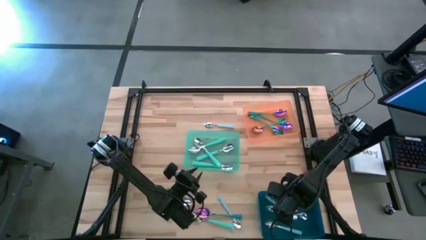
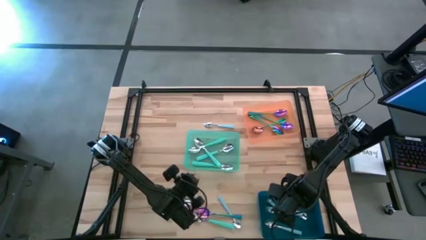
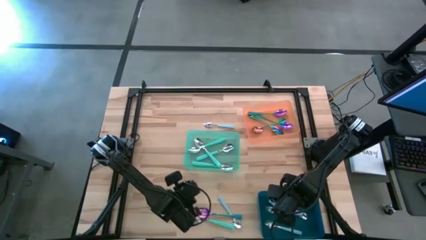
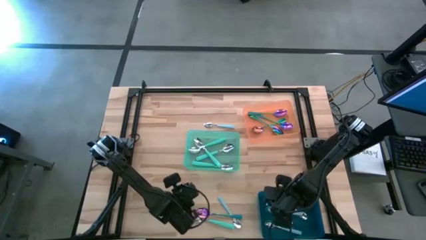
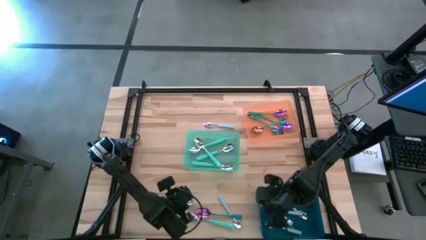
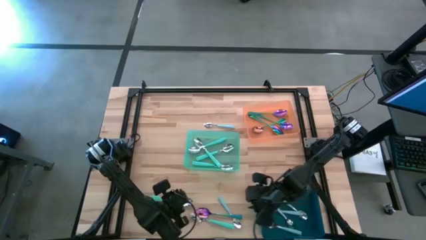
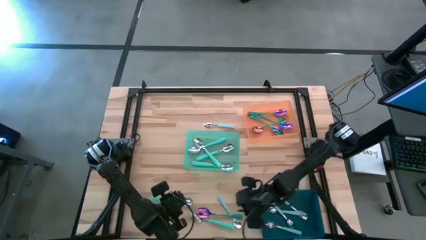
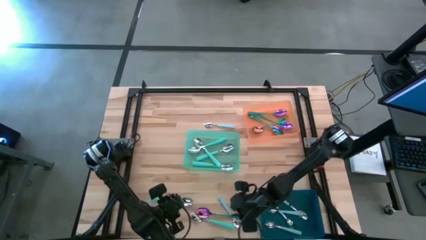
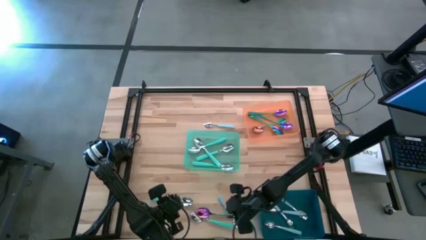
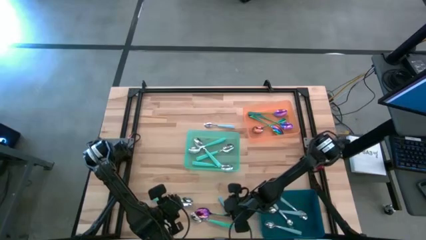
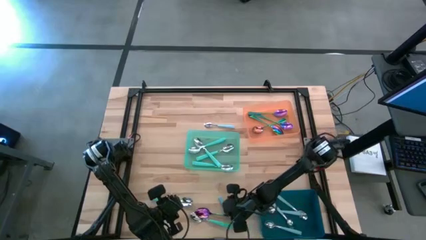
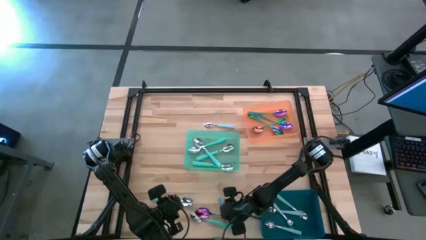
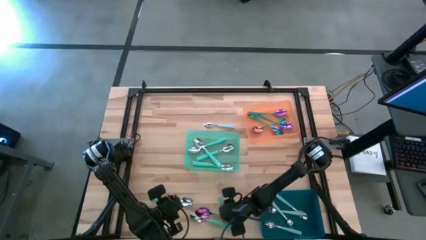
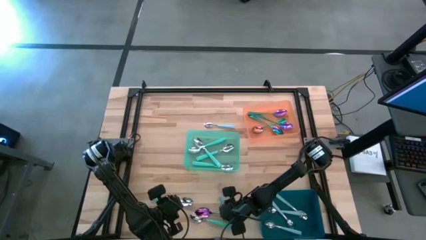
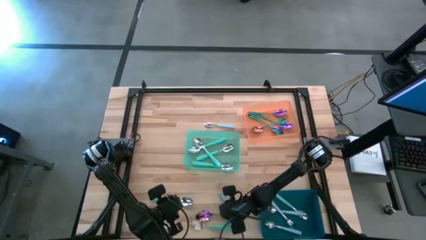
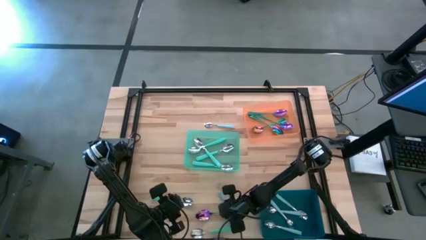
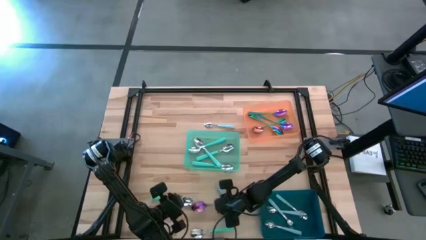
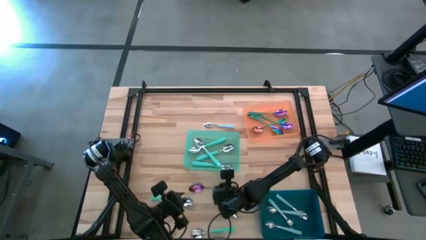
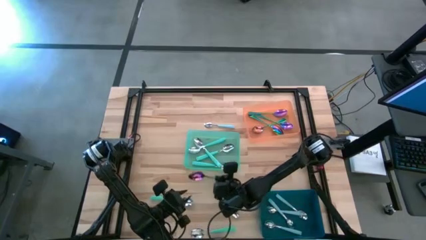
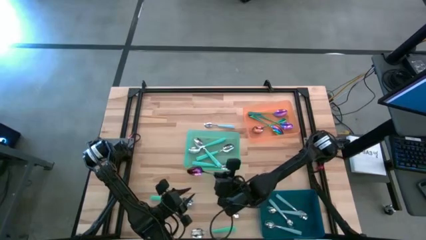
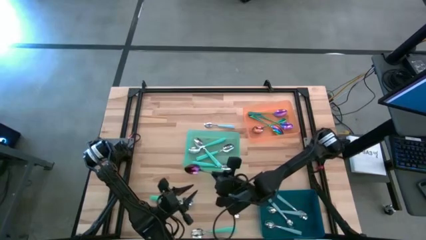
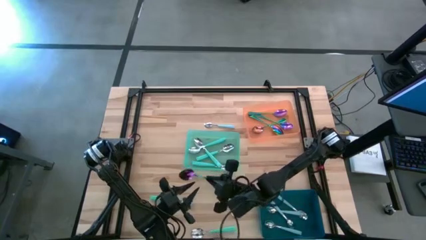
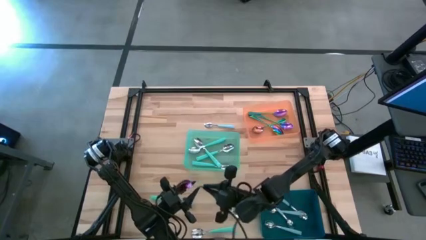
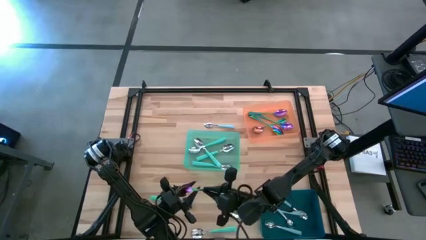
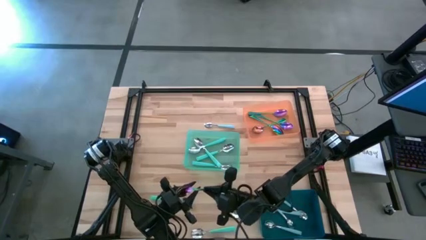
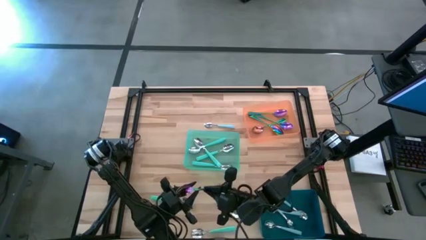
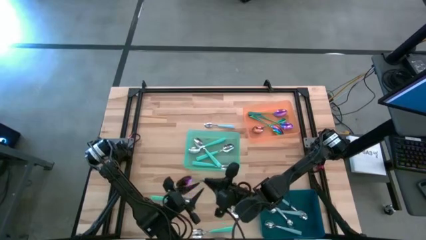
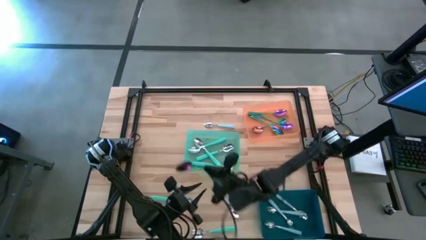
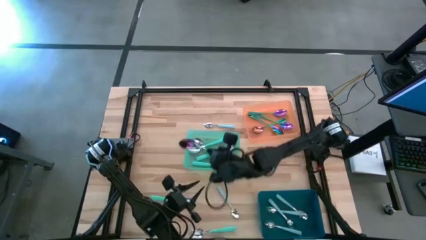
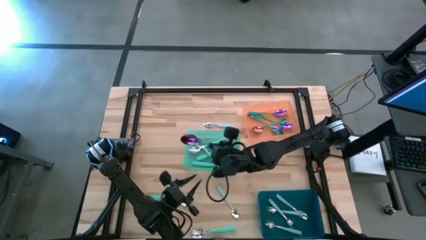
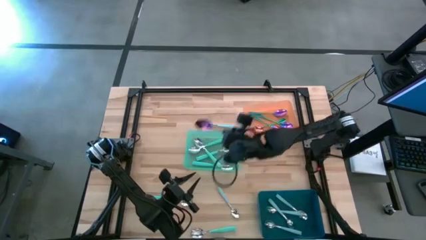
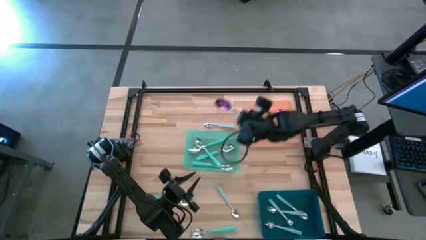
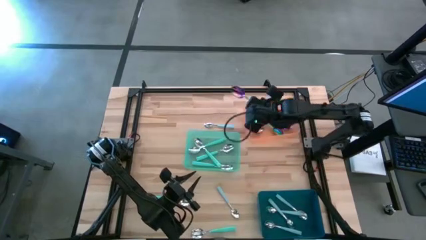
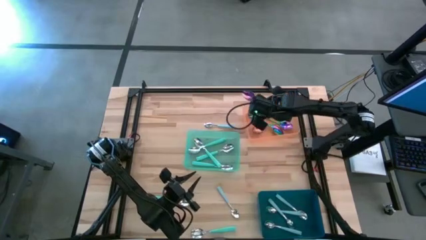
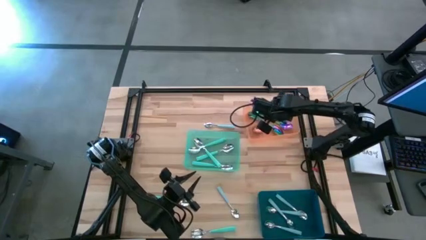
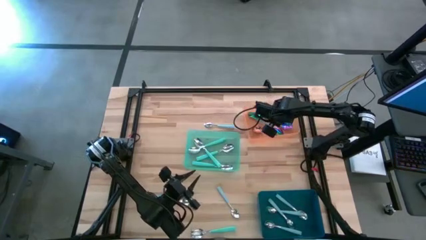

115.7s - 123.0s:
Task: Sort silverware by color (type)
Put the violet spoon into the orange bin

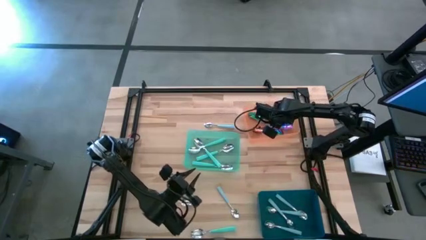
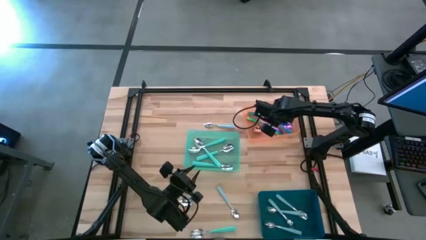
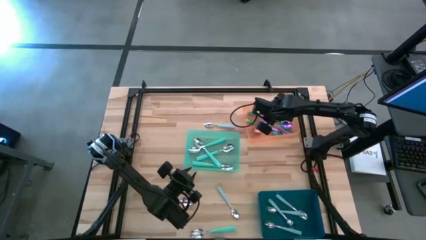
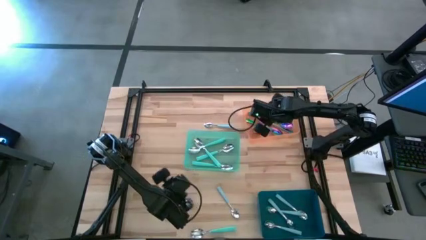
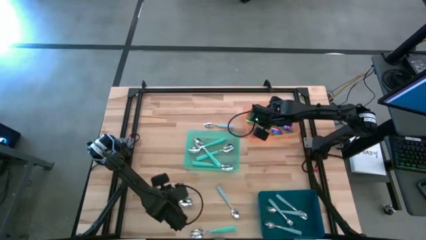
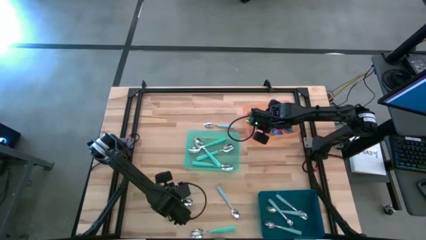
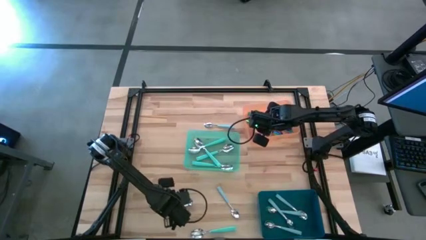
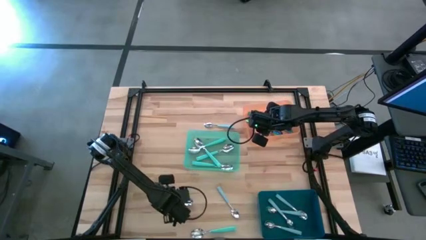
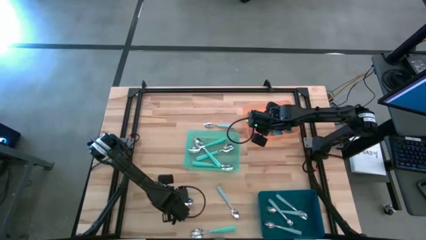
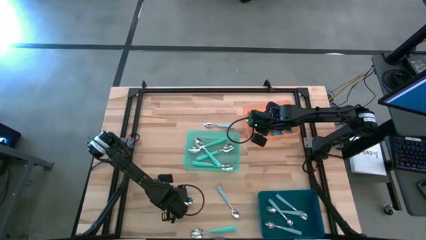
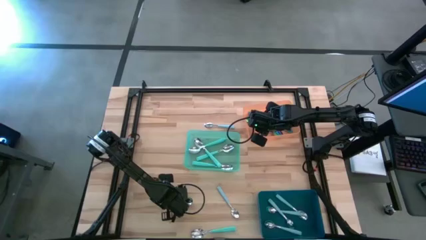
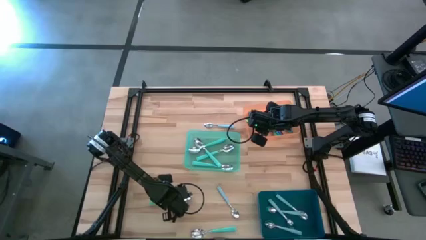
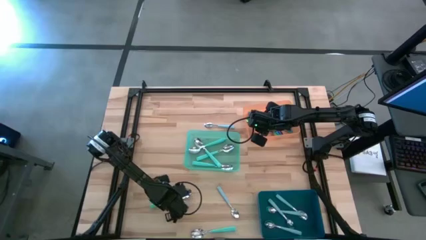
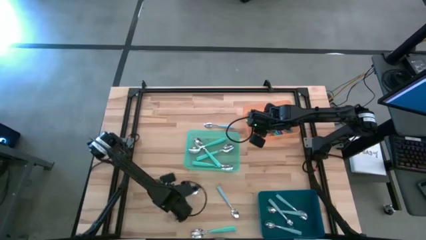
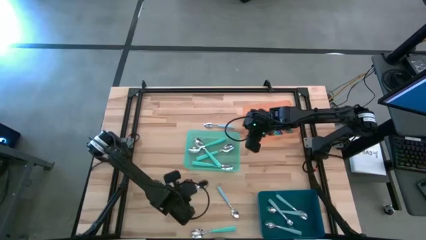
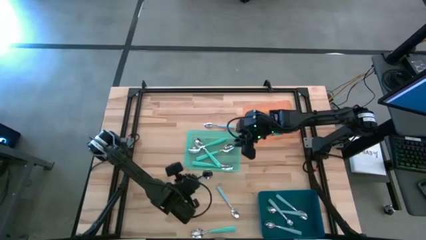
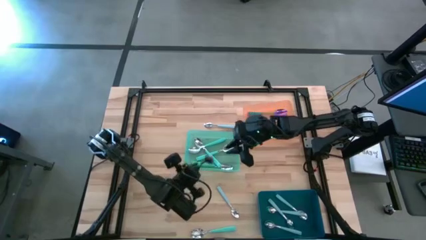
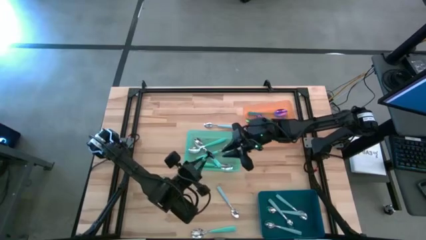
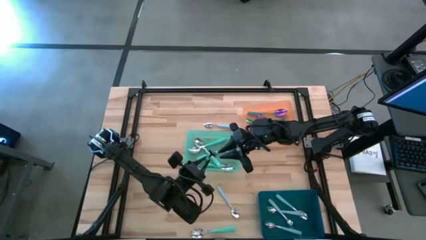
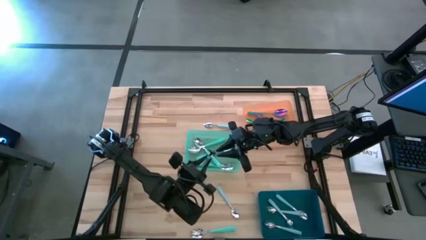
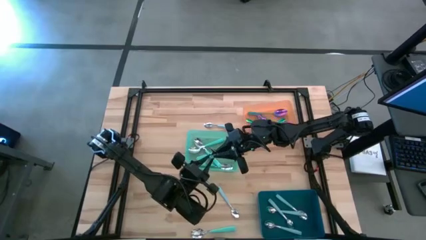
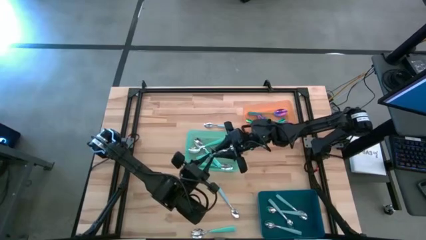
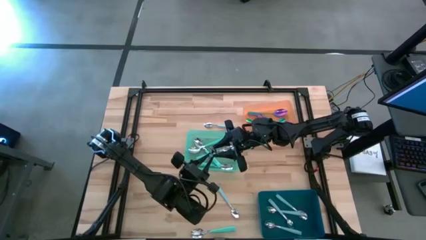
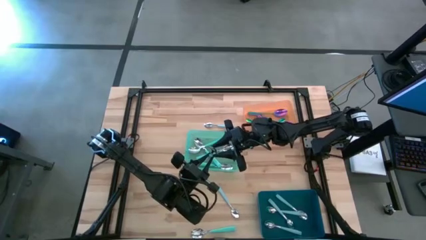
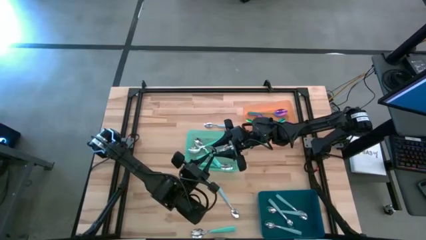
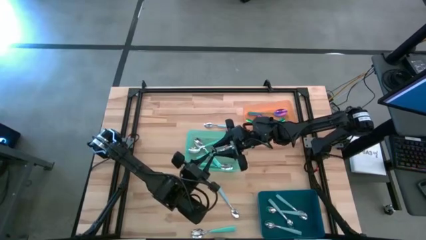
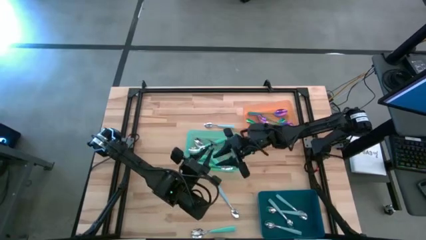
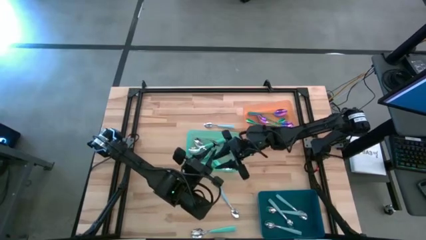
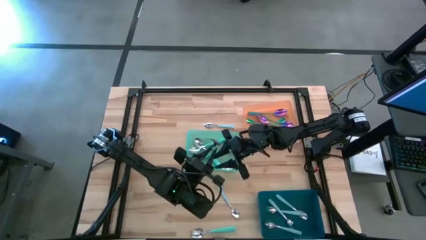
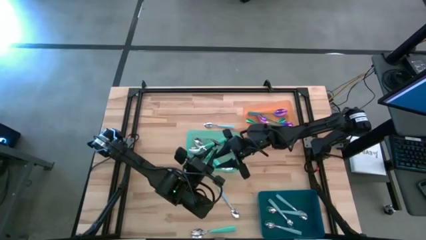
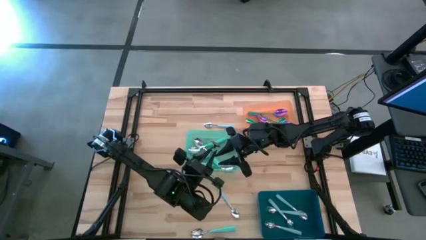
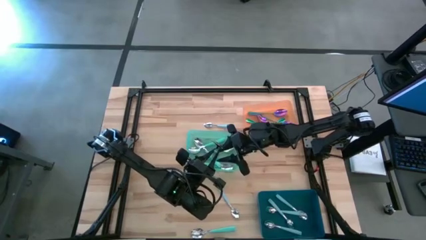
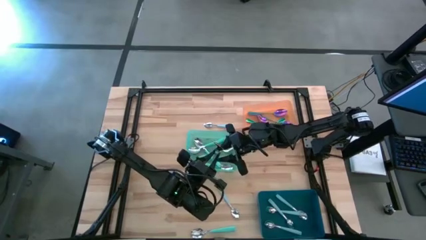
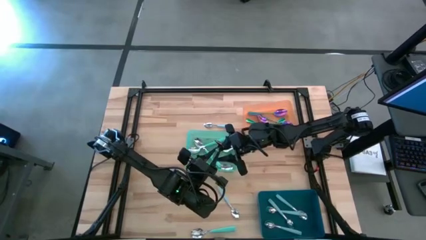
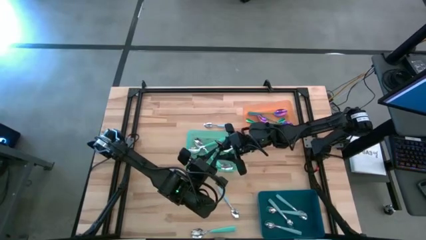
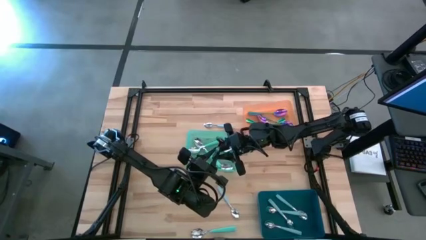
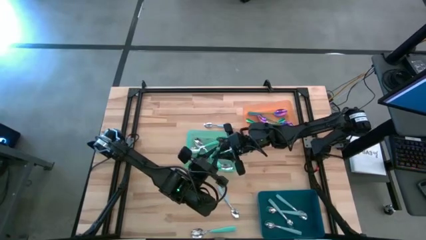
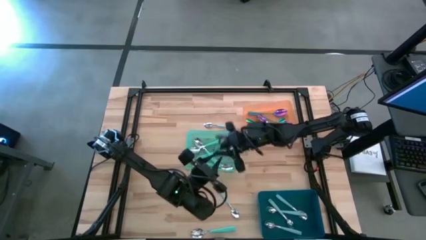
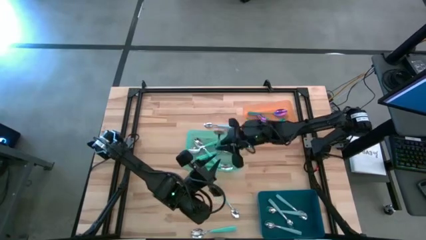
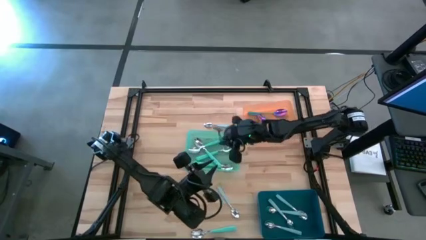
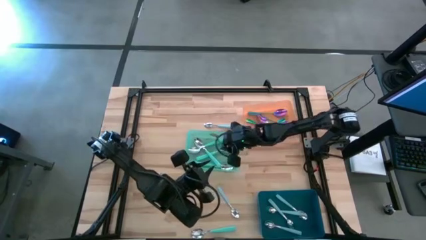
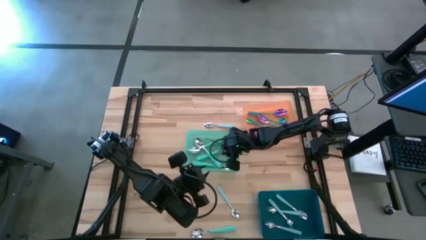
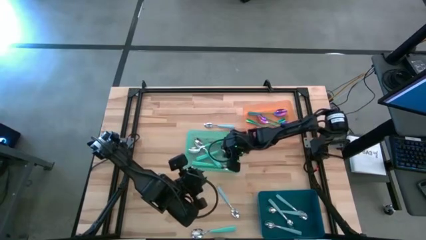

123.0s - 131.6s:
Put the green spoon into the green bin

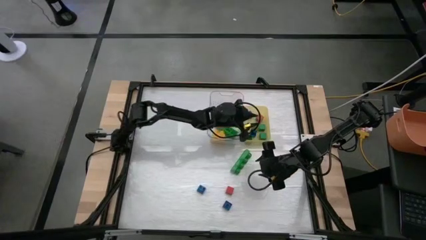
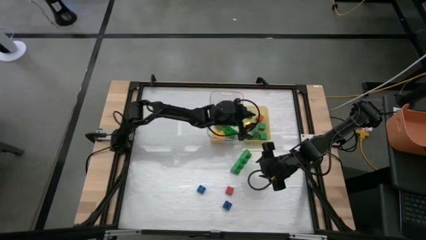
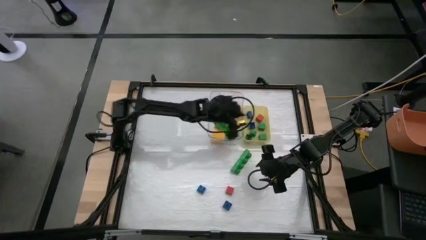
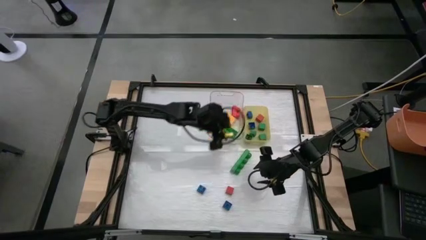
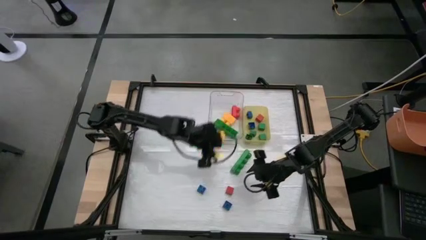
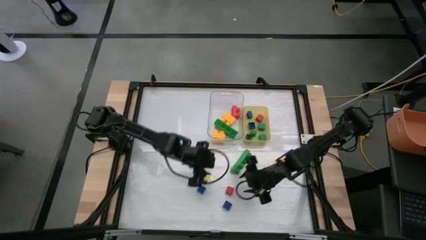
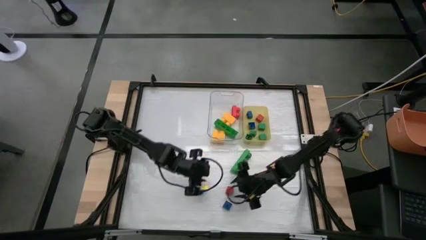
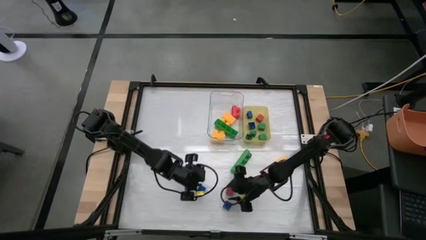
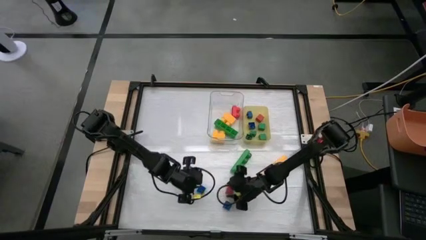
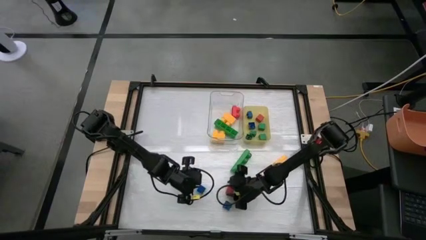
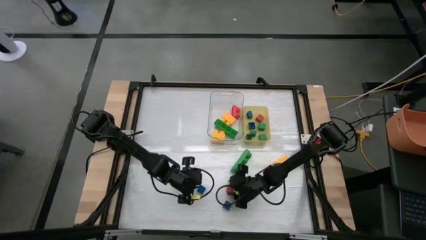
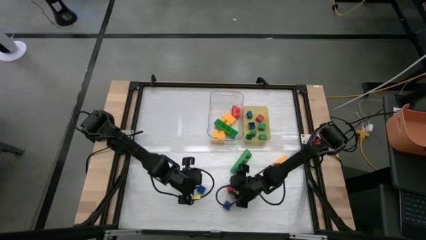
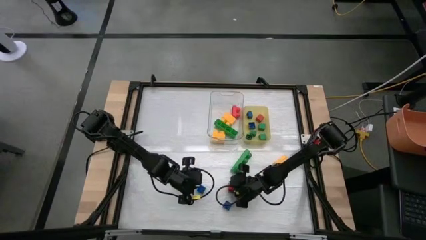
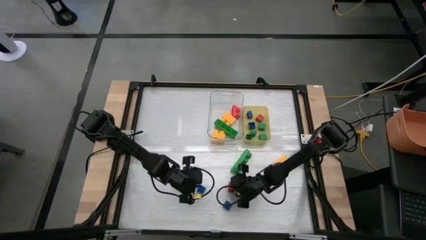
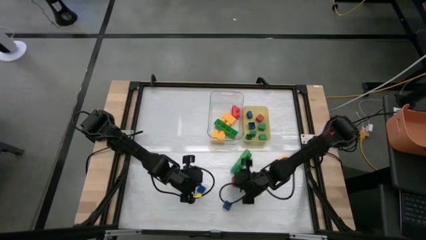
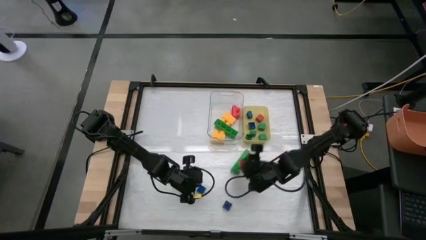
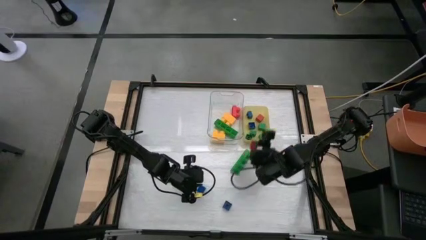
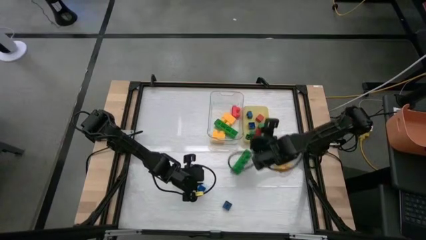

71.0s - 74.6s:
Task: Sort blocks by size
Put the small red block into the yellow bin
